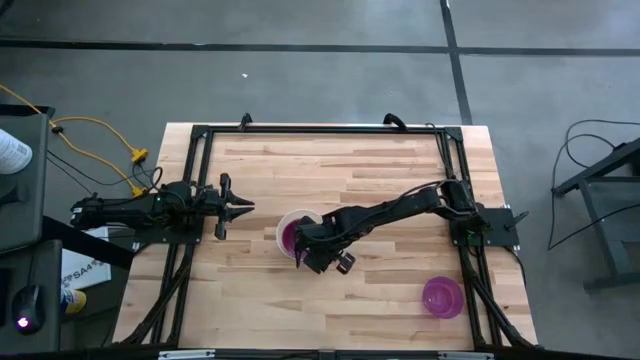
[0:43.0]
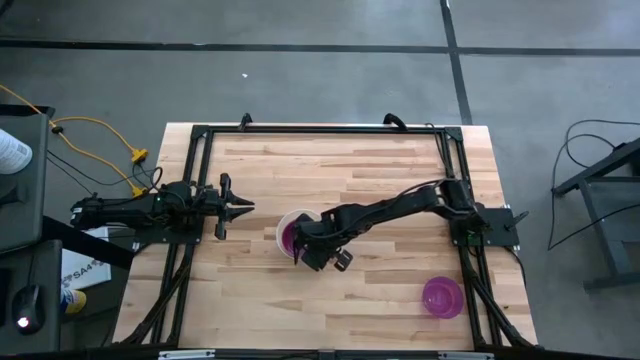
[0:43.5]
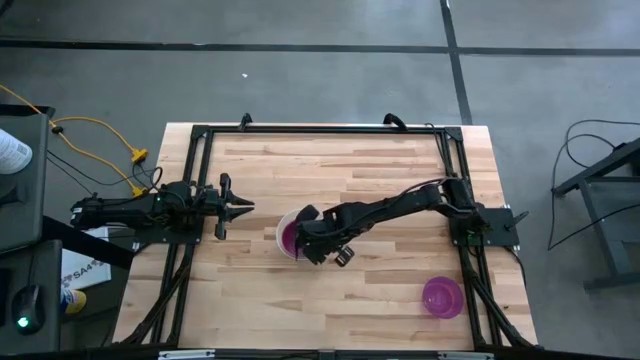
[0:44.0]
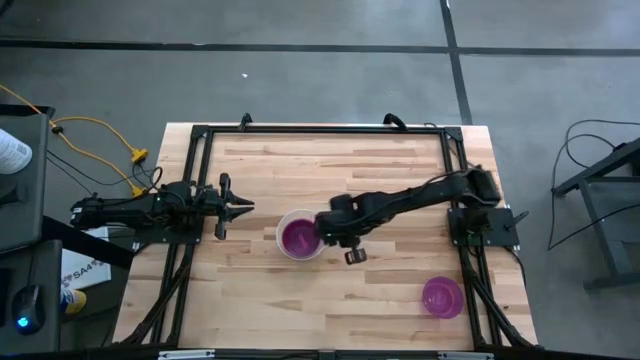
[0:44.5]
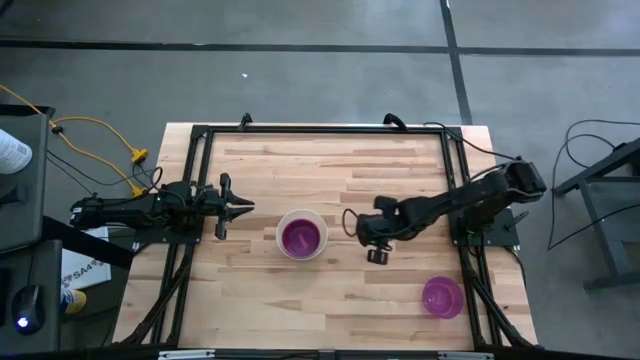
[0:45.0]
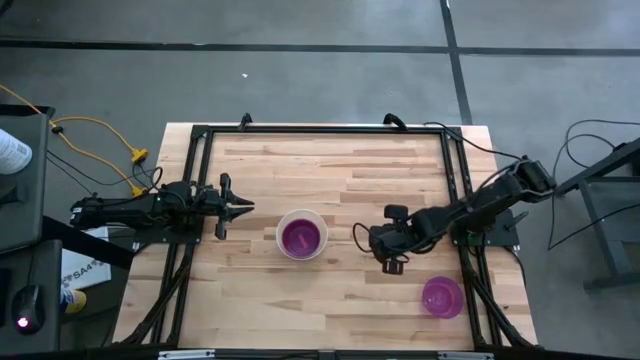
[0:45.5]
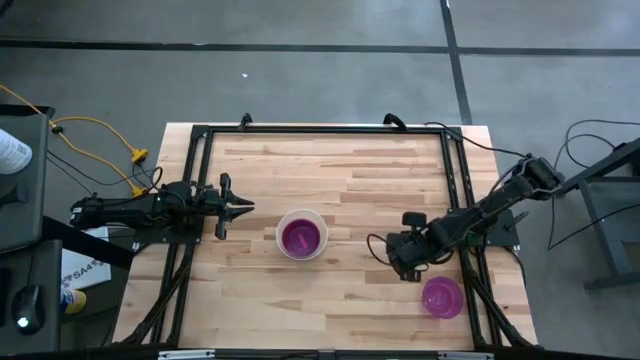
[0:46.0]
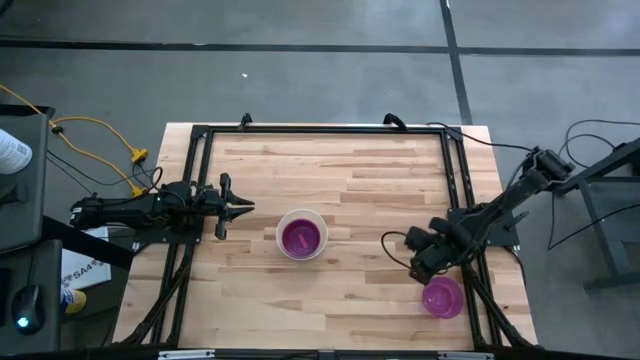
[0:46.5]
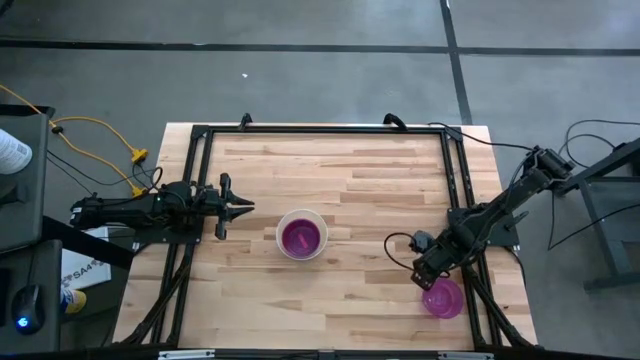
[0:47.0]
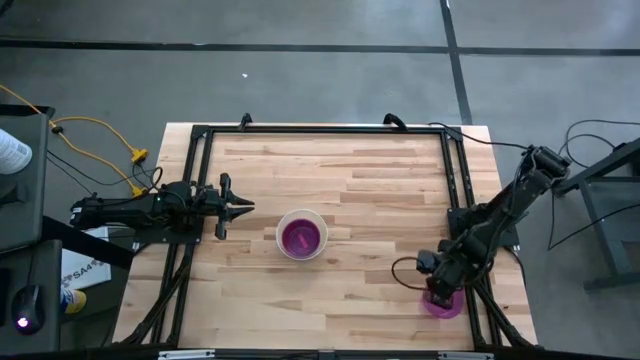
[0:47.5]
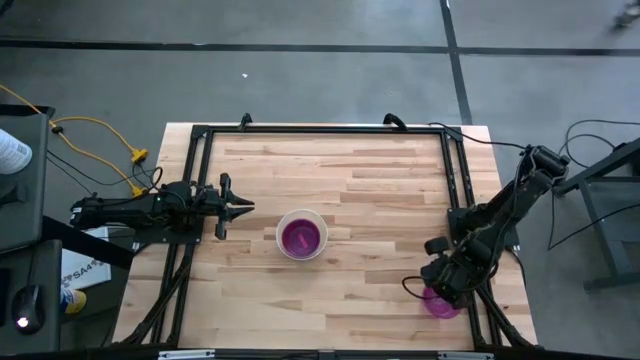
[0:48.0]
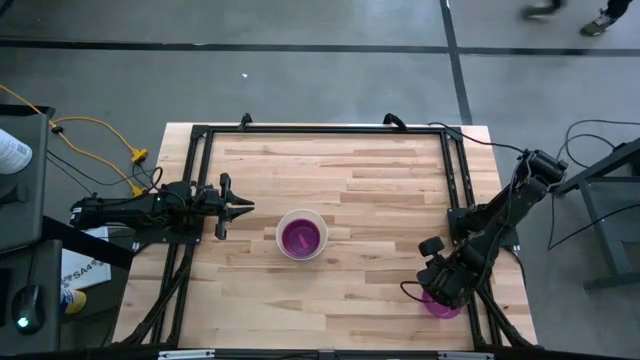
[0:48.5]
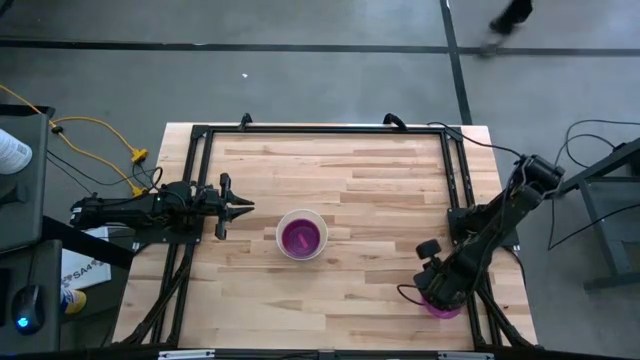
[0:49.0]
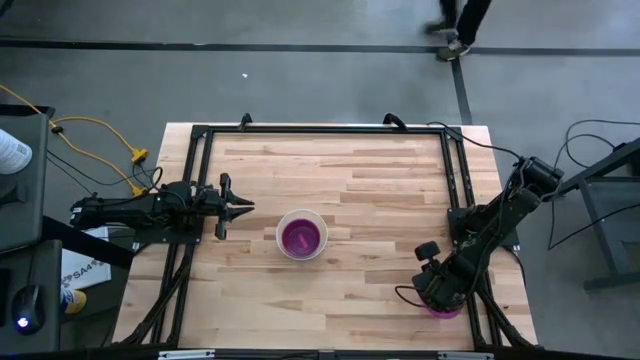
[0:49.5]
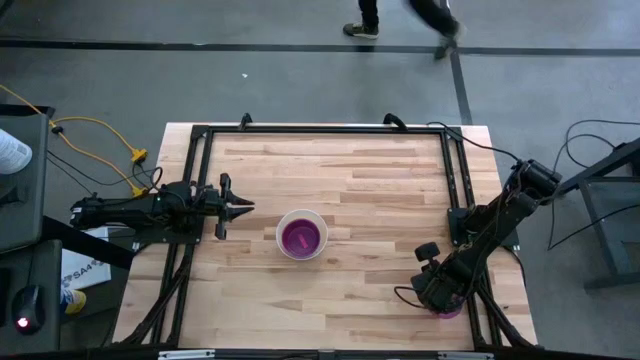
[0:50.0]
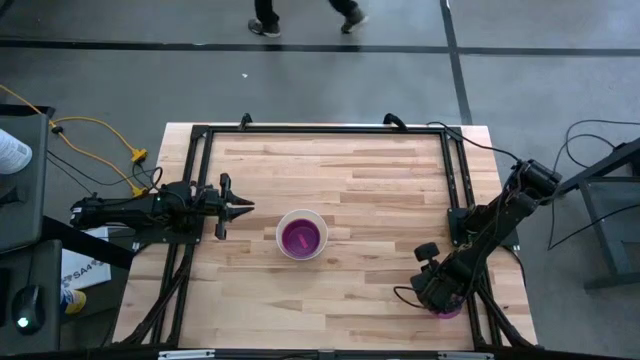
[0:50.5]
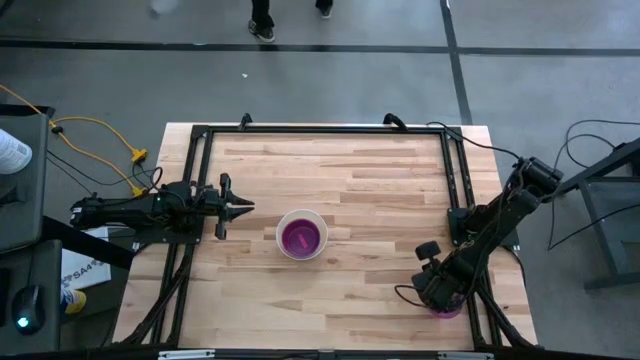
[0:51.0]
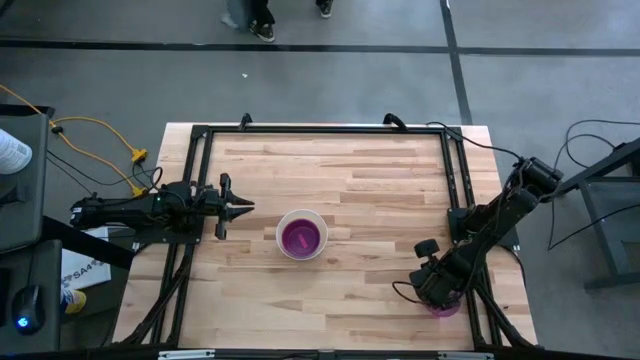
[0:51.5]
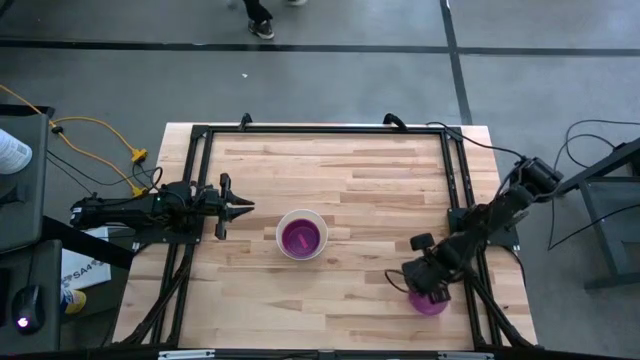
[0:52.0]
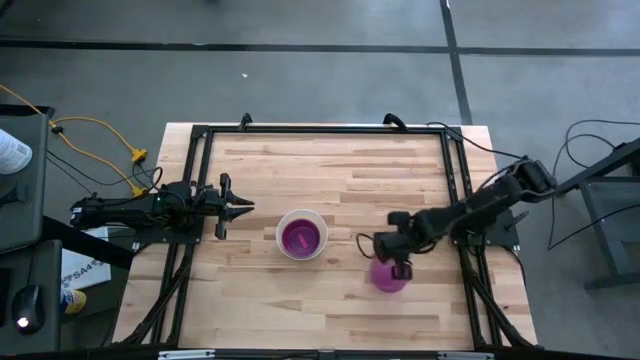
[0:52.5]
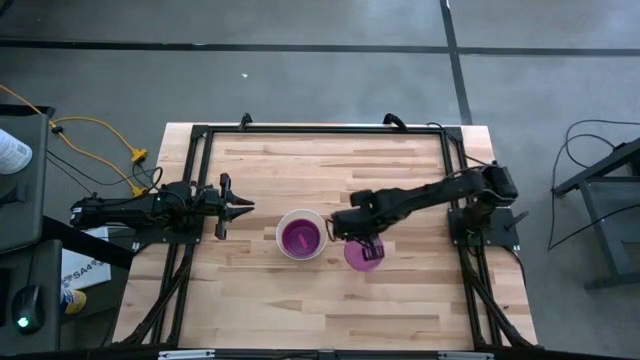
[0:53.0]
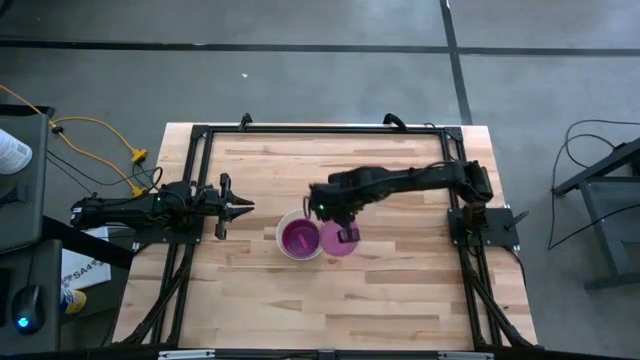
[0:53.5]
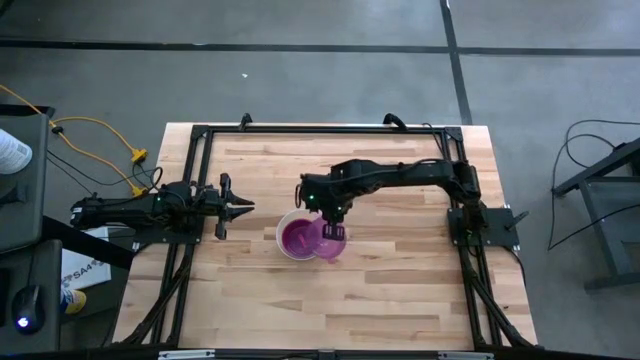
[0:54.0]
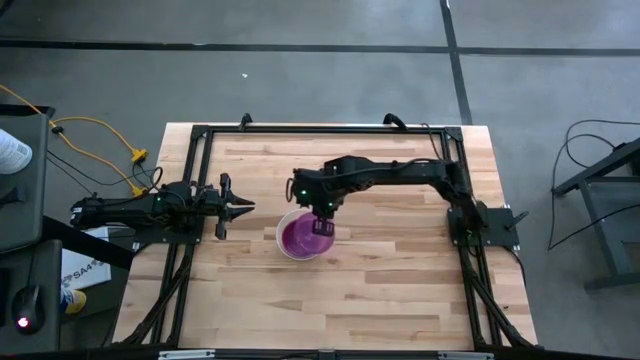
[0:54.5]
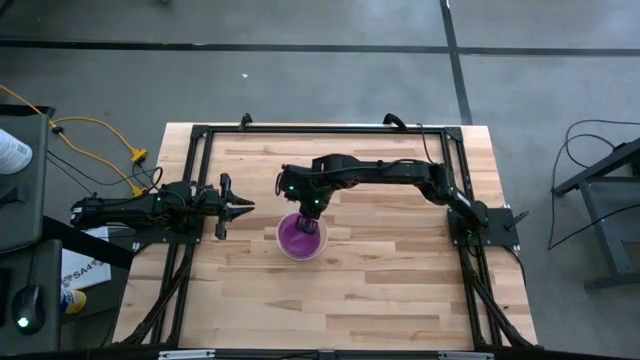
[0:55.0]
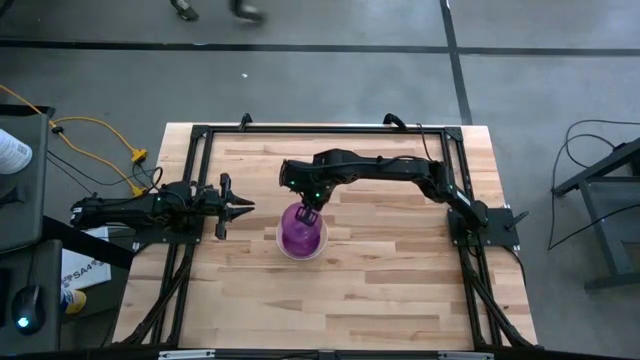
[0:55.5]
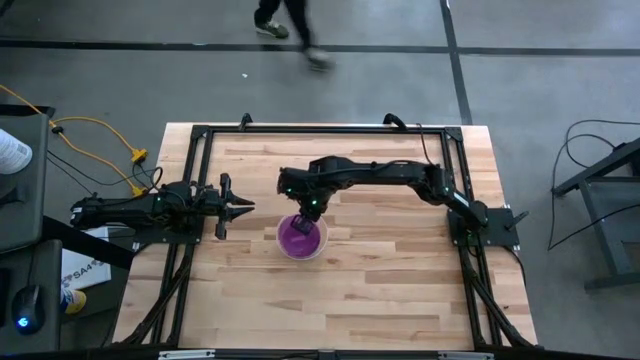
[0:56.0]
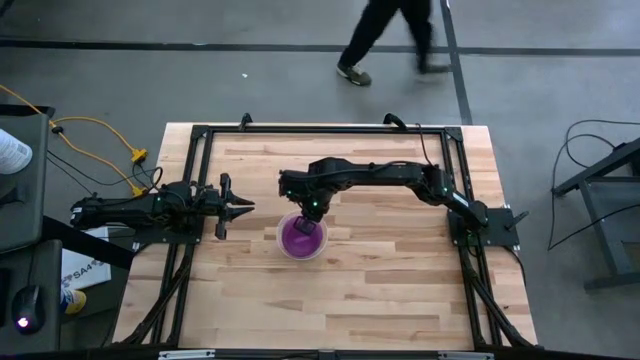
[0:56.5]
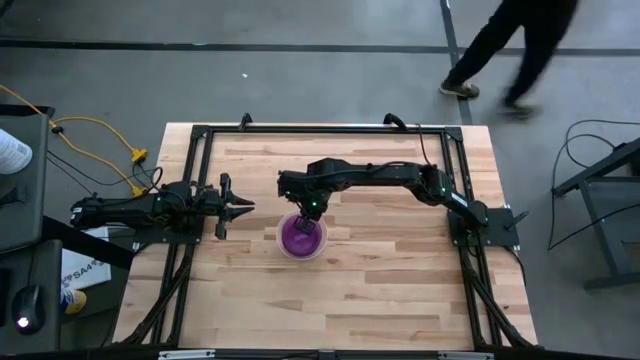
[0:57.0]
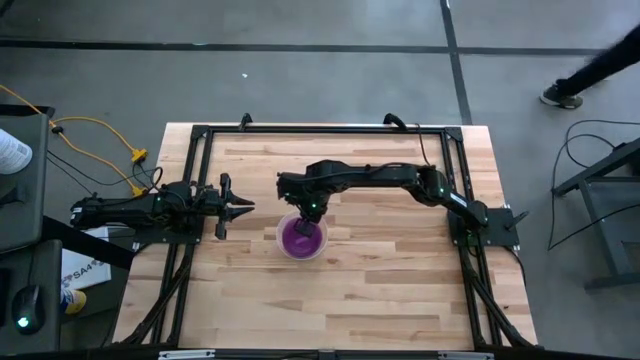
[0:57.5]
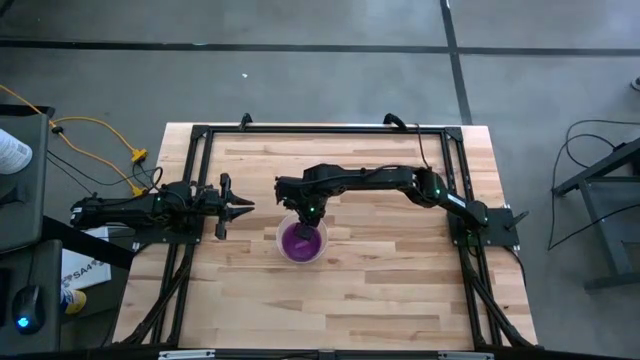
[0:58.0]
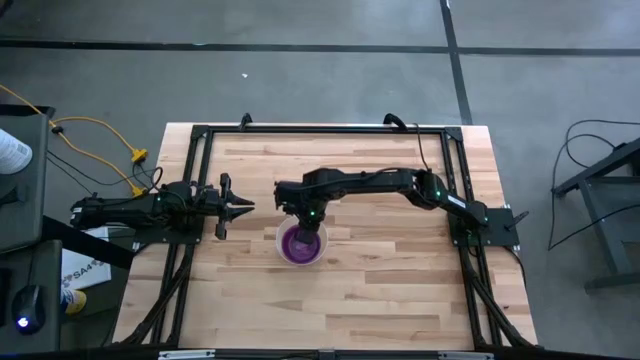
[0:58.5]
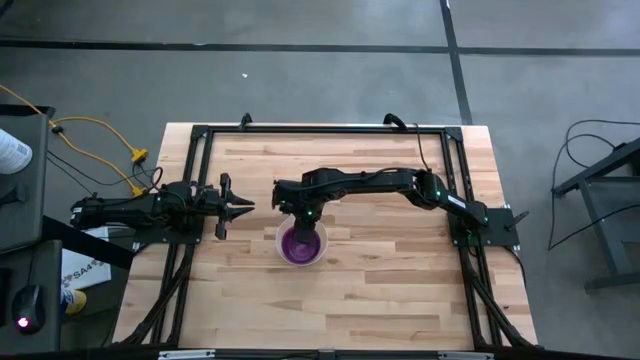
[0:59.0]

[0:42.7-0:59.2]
Stack the purple bowl on top of the pink bowl on the table
